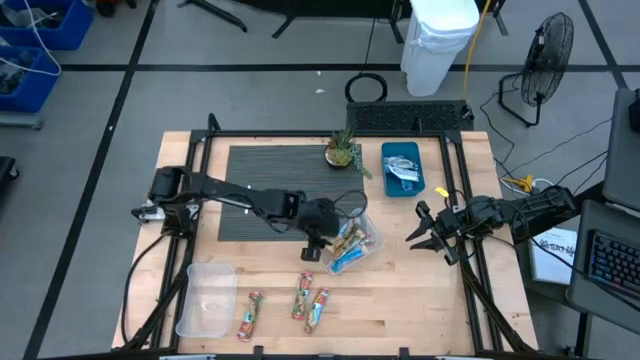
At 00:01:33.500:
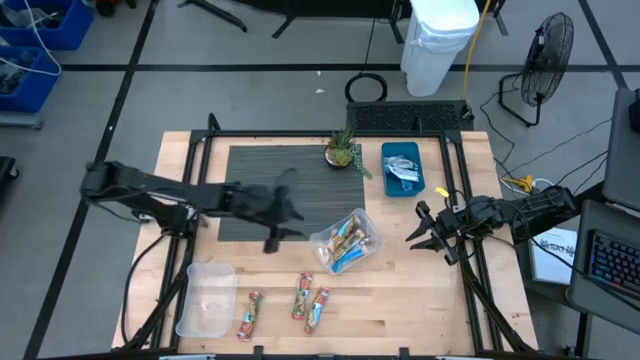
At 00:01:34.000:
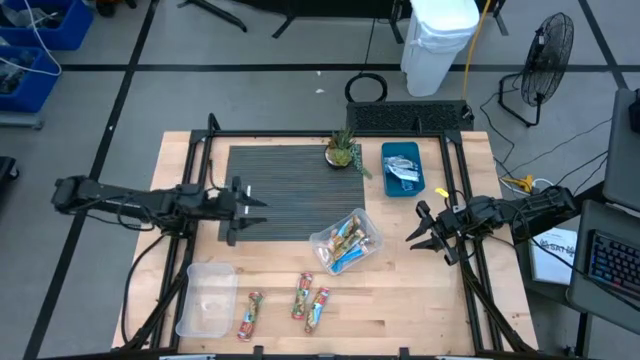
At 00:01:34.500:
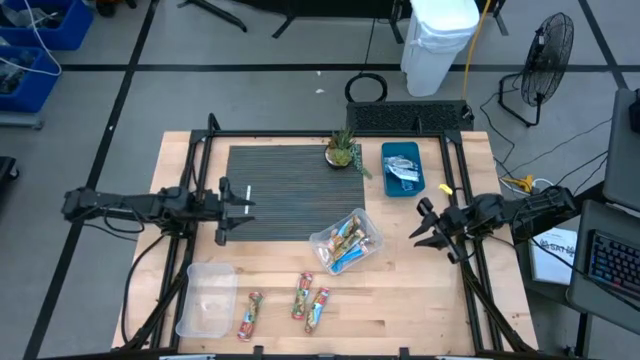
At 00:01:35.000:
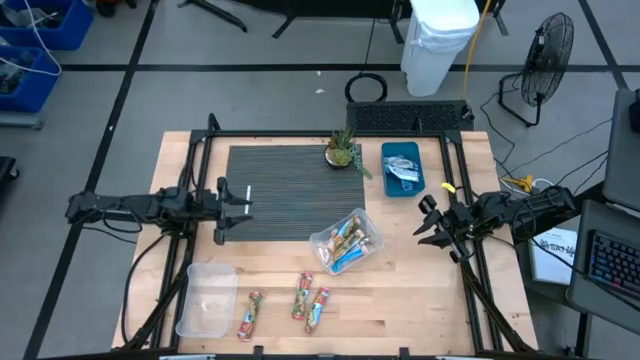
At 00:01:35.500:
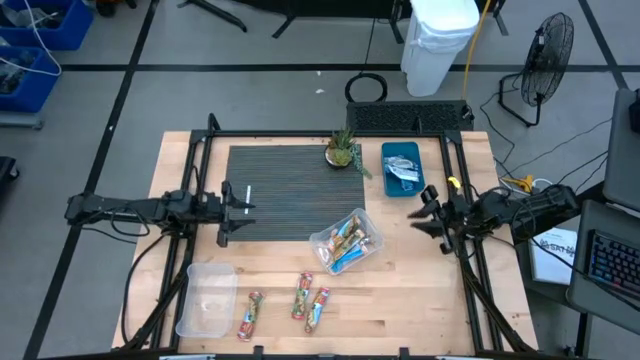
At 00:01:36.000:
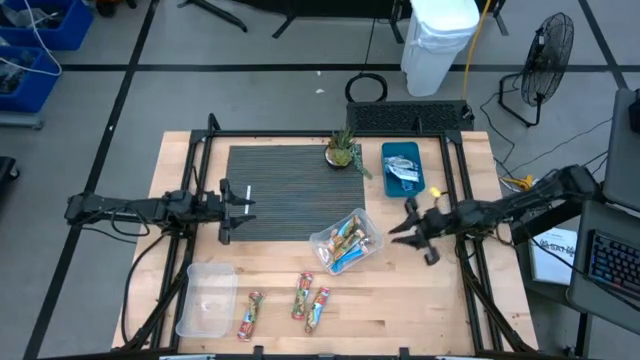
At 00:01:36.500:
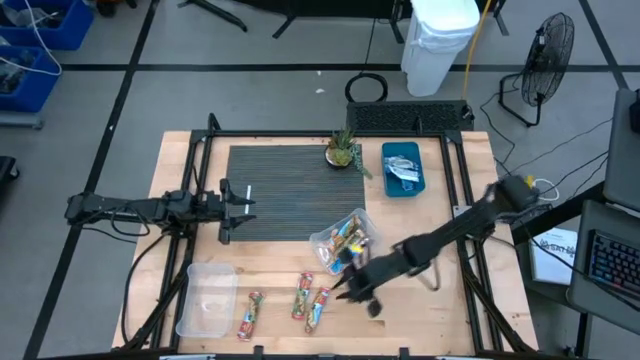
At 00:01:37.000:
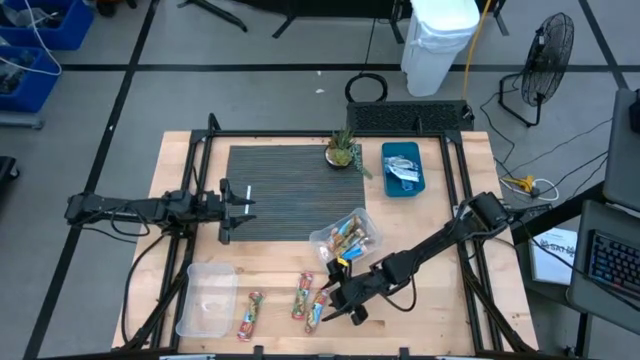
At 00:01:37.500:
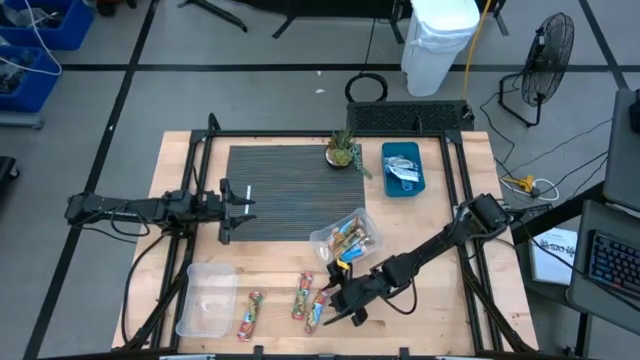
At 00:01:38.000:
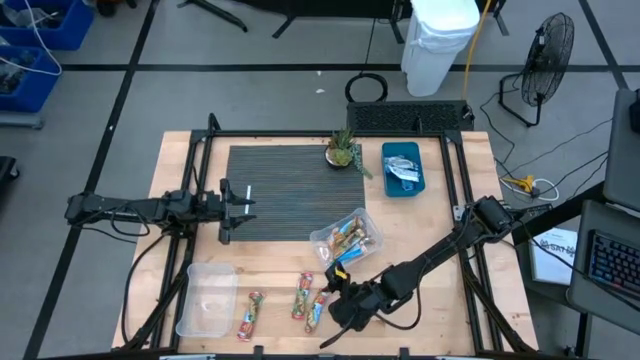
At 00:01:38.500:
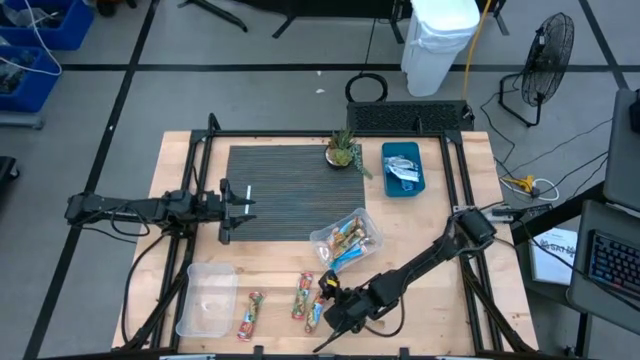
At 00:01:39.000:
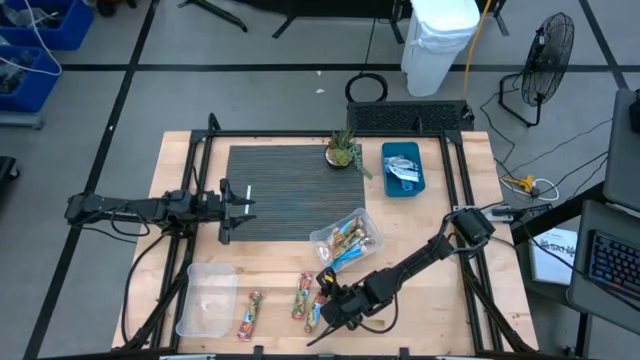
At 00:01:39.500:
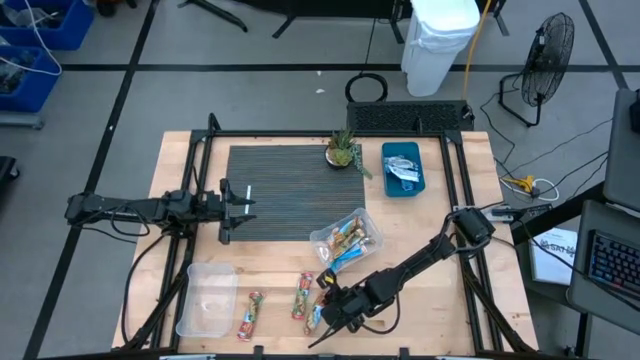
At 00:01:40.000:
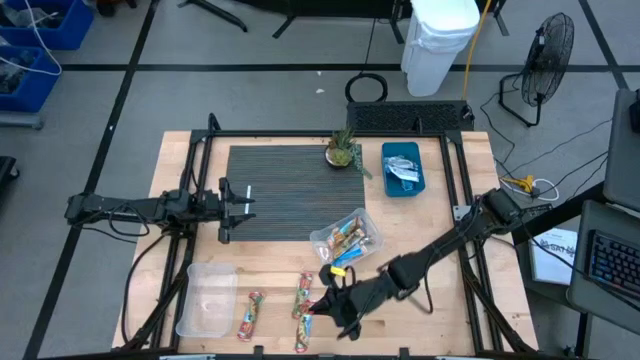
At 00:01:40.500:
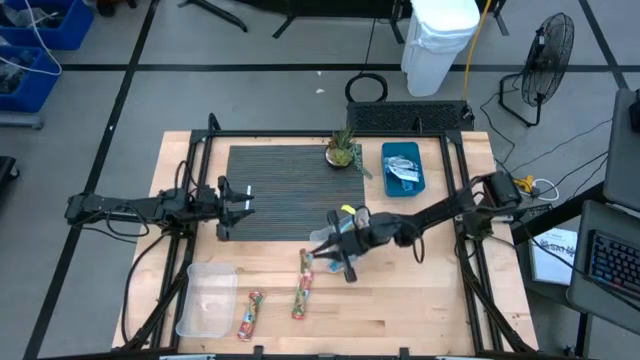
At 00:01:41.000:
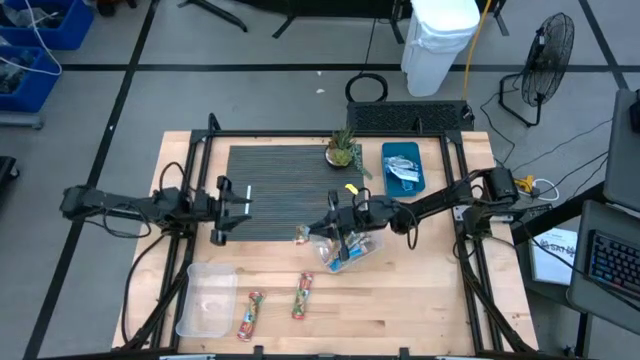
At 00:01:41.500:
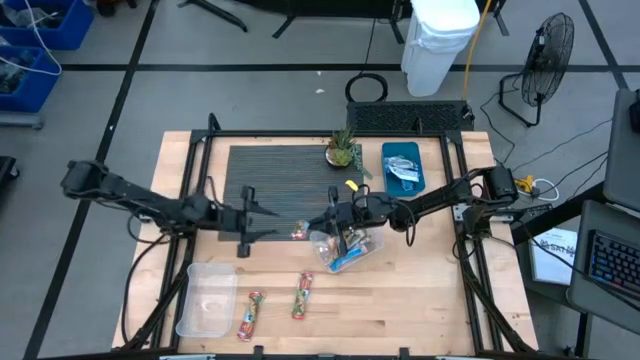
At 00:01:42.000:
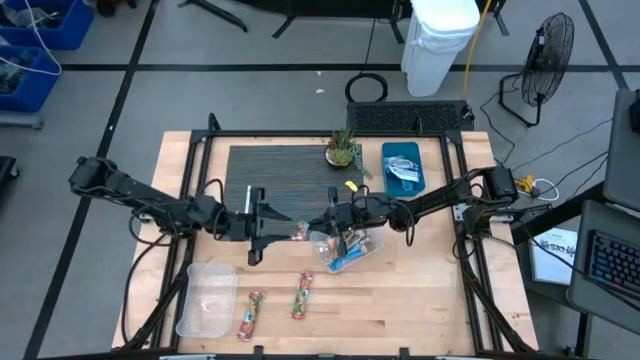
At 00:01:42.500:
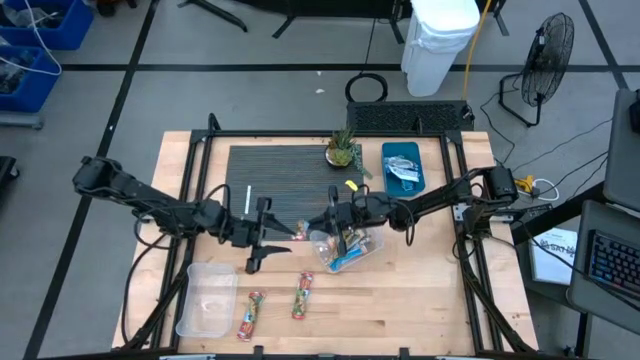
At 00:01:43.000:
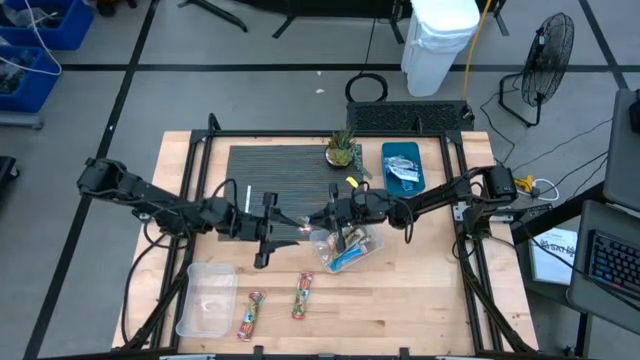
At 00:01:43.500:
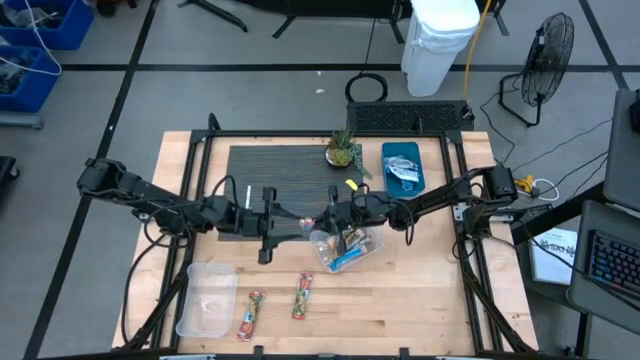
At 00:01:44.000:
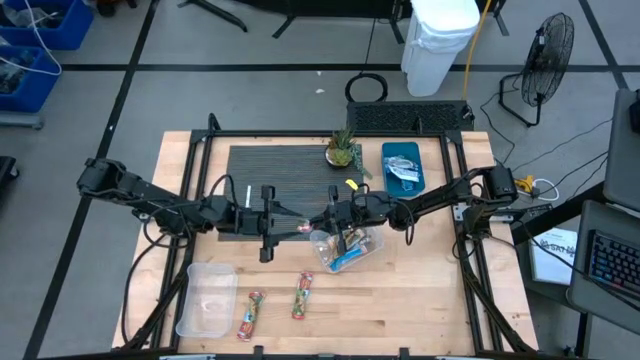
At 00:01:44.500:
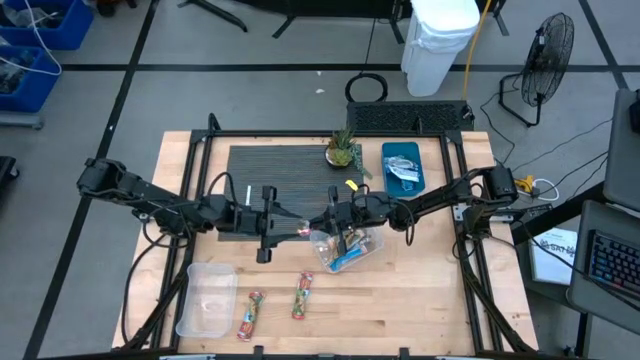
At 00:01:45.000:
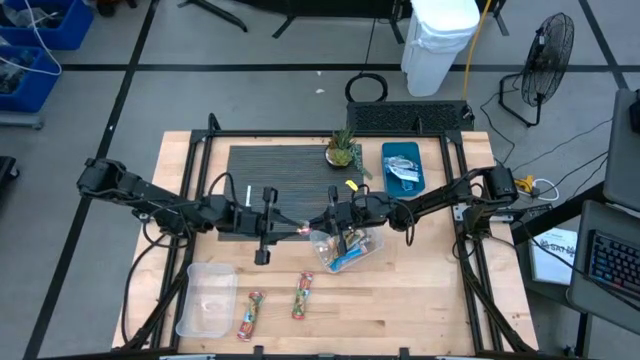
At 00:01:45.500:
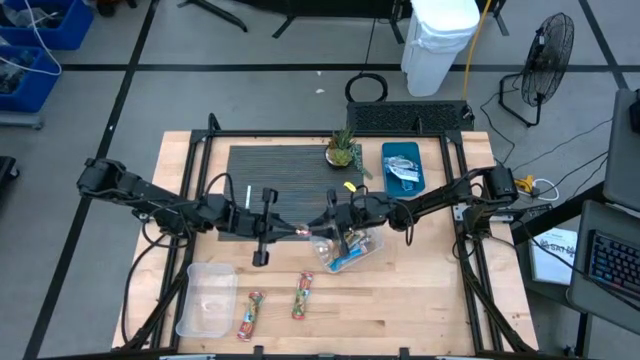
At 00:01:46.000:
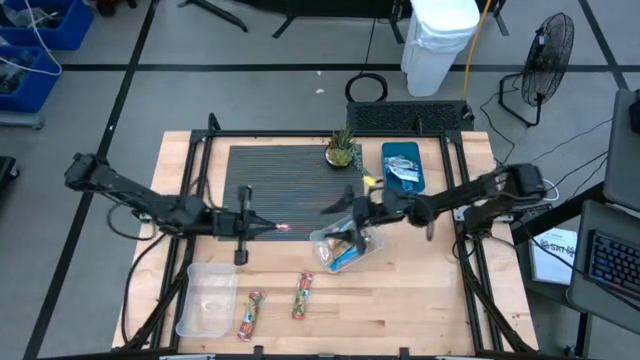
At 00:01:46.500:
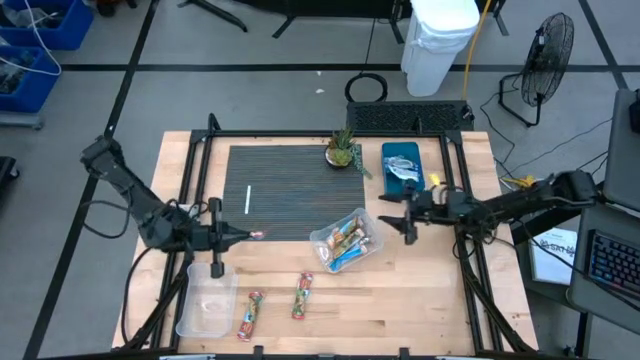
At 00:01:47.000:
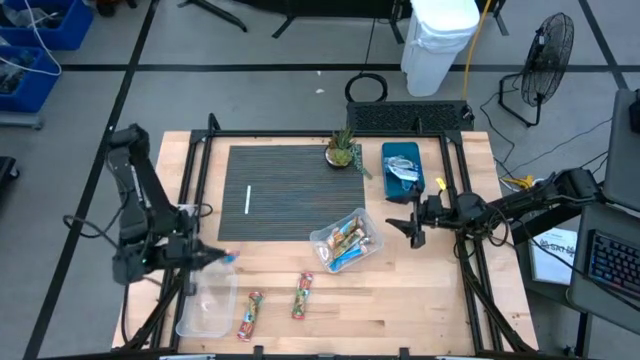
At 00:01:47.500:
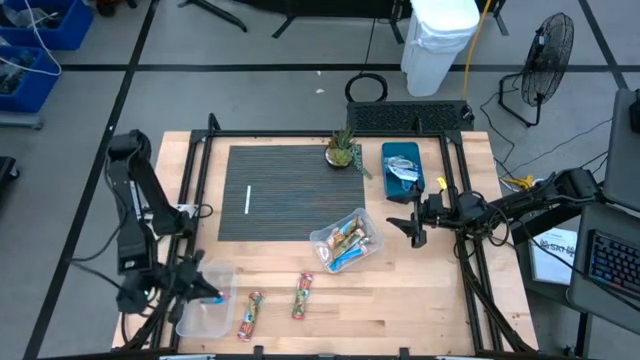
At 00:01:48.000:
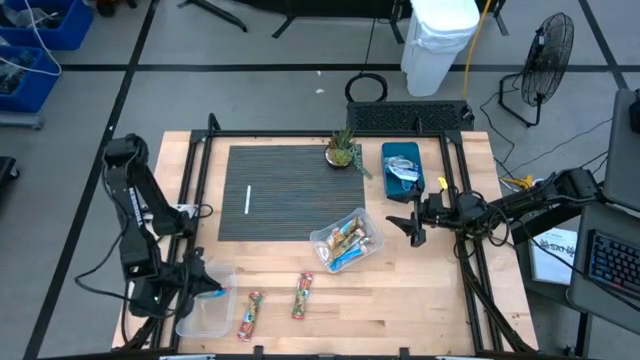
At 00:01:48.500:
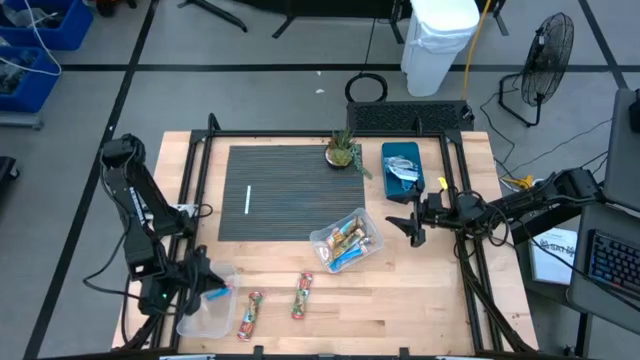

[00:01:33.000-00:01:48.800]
Task: Pick and place Granola Bars by type
Put the right red granola bar into the bottom transparent bin

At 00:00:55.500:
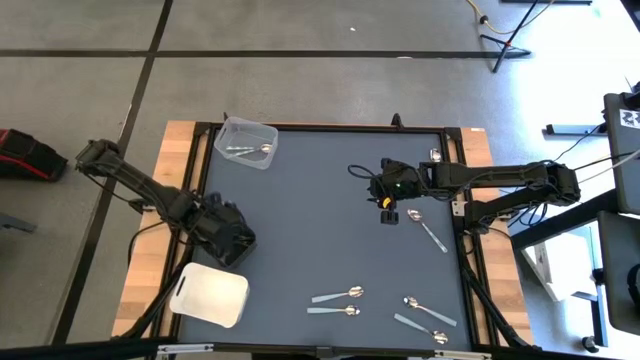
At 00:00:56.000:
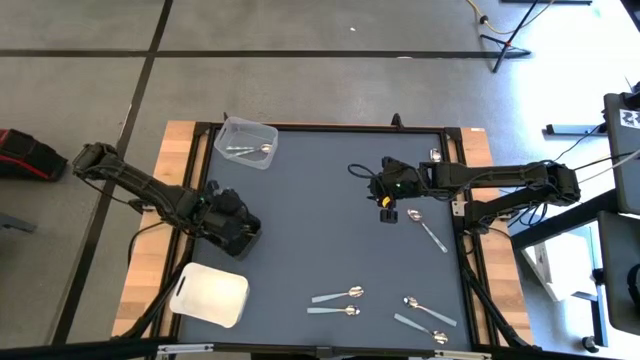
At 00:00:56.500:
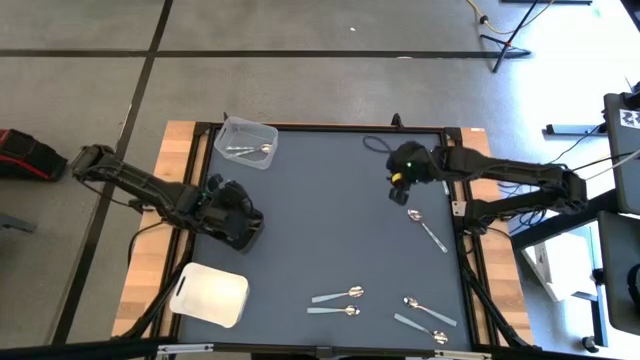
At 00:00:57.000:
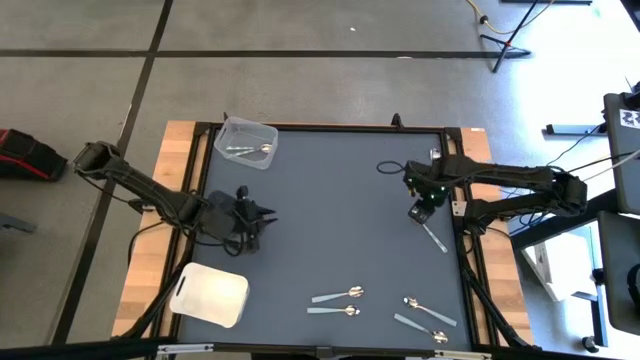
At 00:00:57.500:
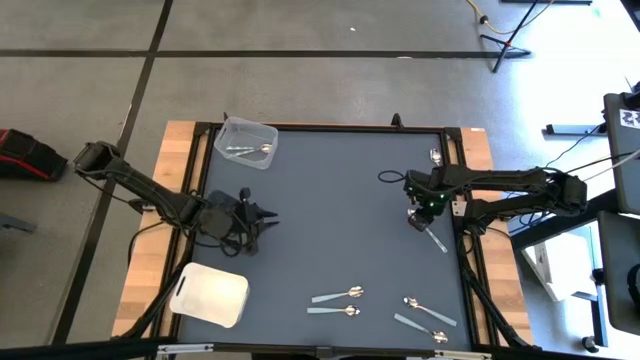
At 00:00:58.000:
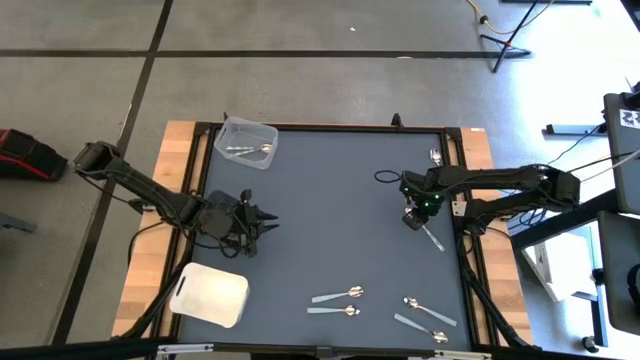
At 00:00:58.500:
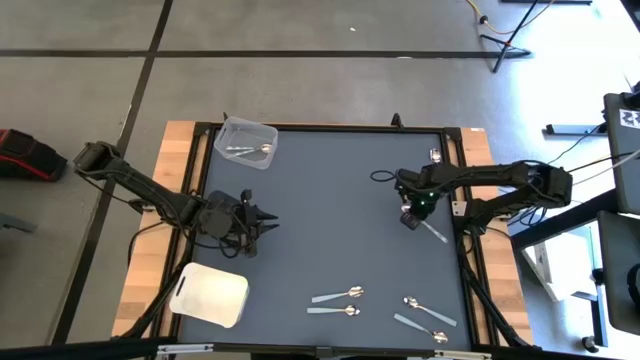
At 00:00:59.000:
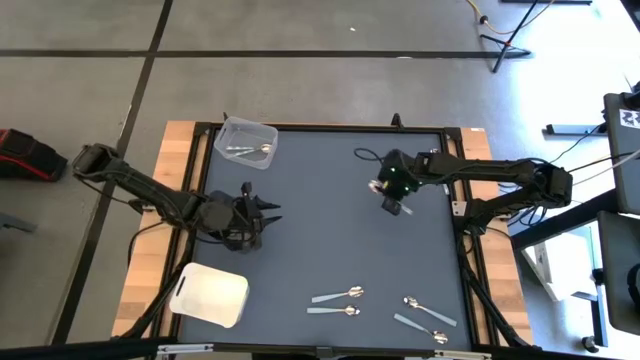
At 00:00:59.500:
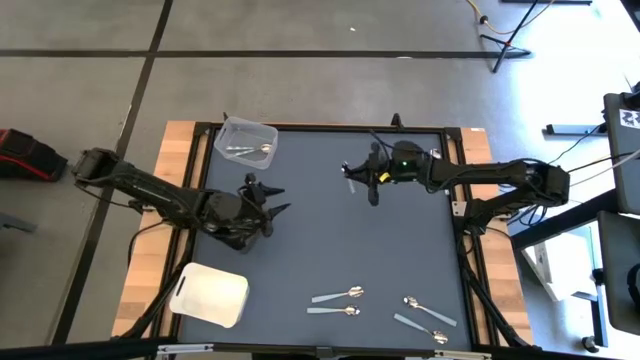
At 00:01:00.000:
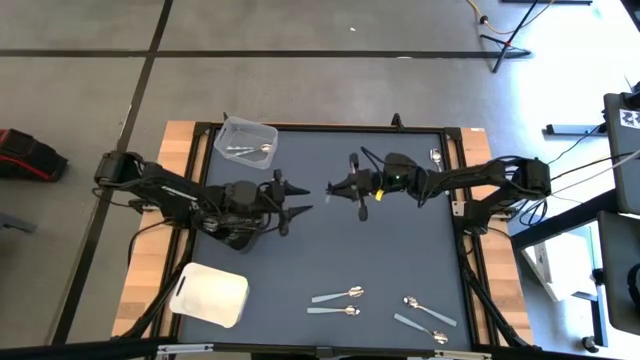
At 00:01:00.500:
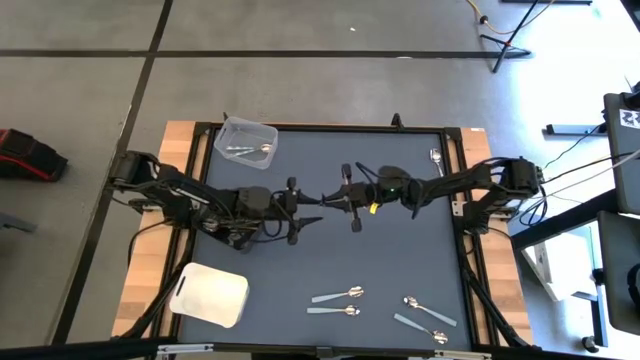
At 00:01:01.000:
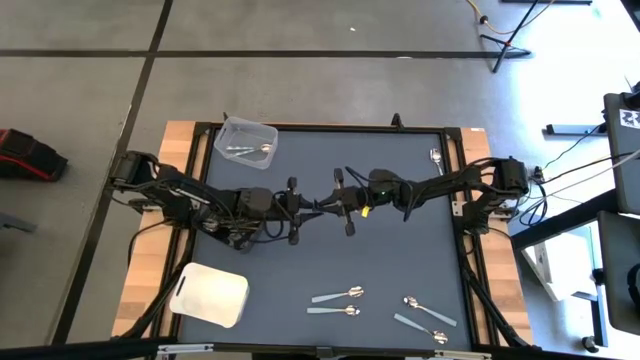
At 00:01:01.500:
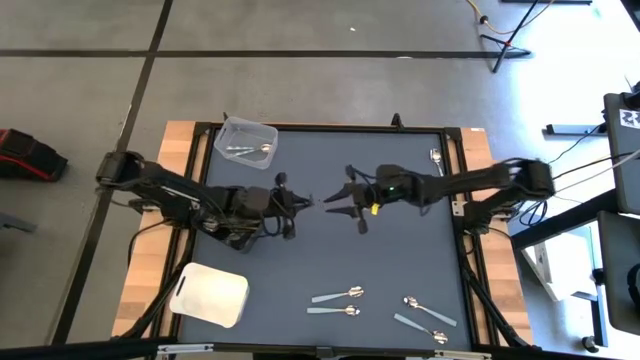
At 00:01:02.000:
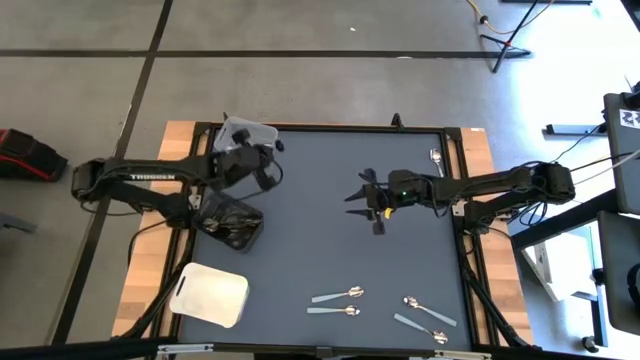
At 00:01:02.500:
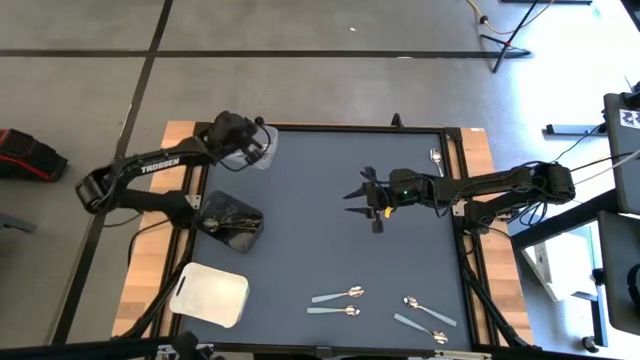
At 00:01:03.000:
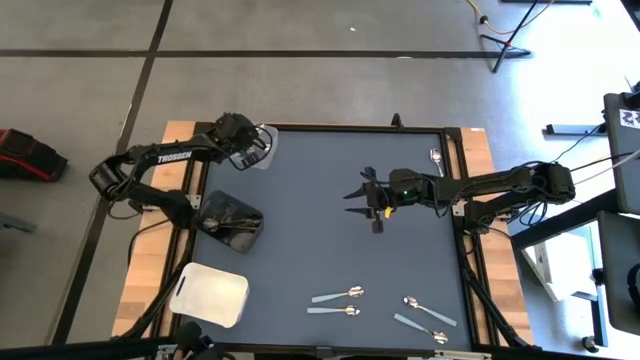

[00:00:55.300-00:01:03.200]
Task: Sort silverware by color (type)
Put the green spoon into the transparent bin
